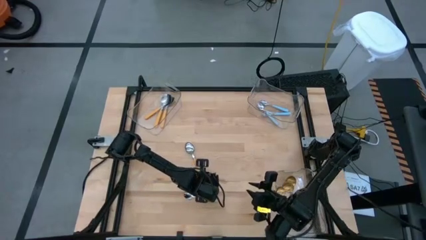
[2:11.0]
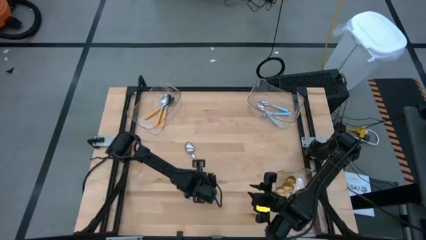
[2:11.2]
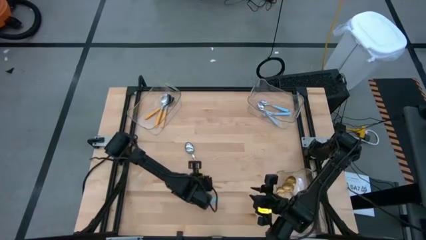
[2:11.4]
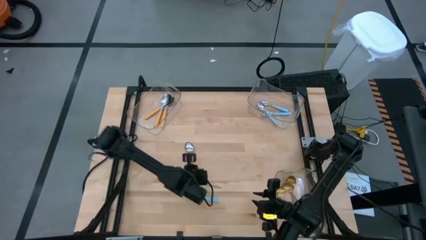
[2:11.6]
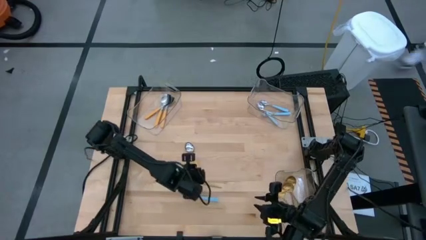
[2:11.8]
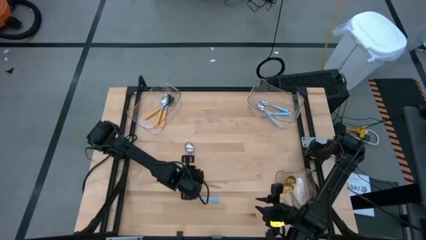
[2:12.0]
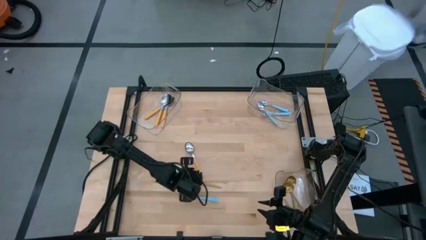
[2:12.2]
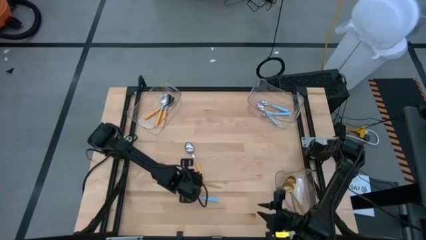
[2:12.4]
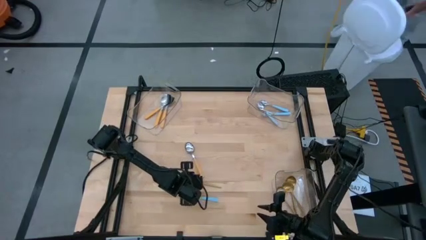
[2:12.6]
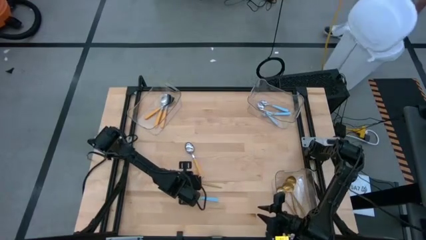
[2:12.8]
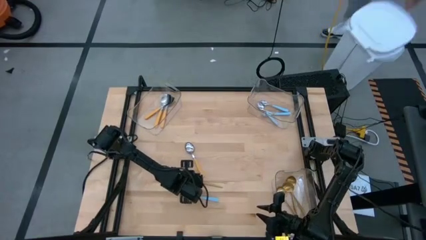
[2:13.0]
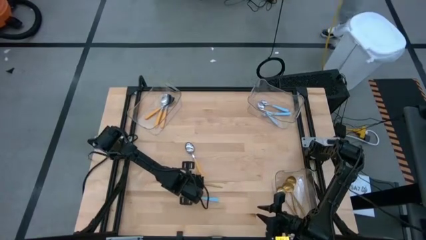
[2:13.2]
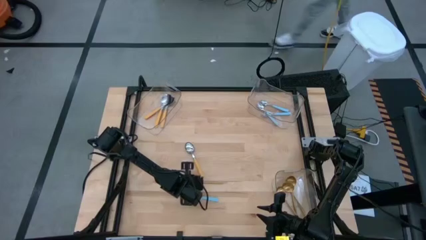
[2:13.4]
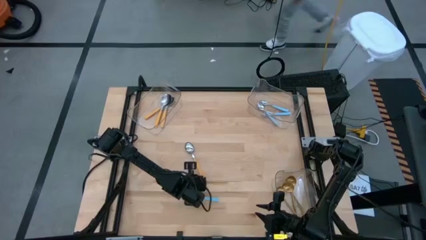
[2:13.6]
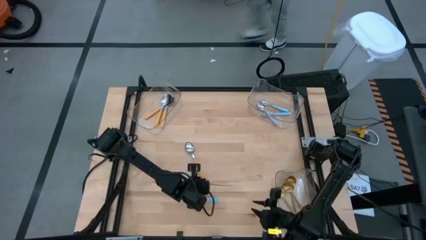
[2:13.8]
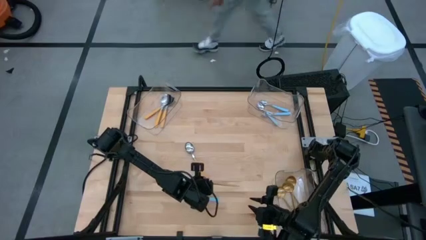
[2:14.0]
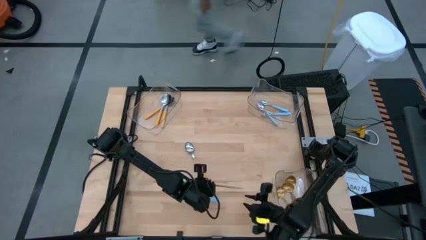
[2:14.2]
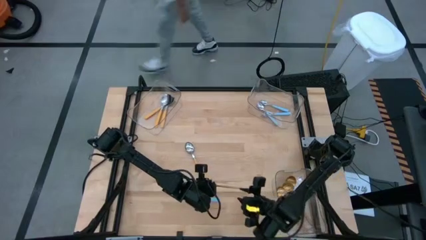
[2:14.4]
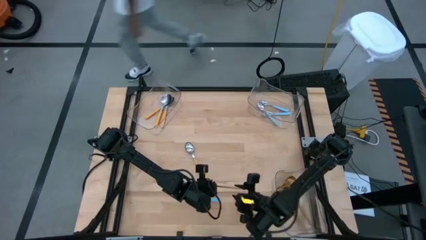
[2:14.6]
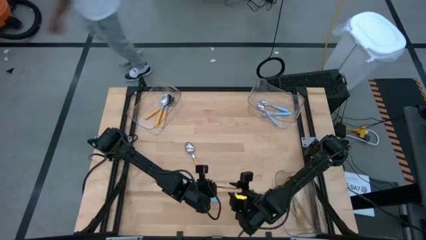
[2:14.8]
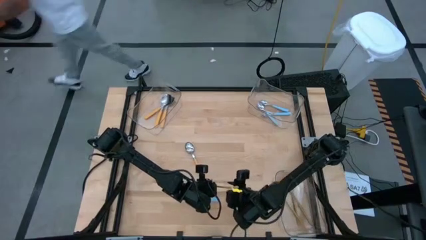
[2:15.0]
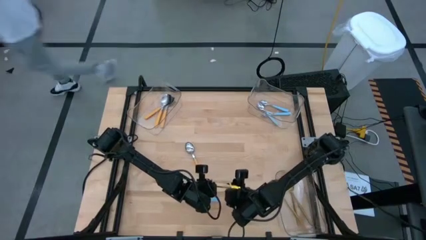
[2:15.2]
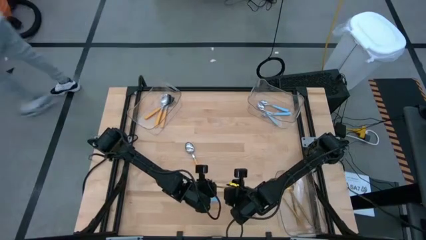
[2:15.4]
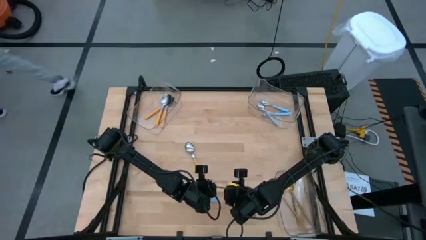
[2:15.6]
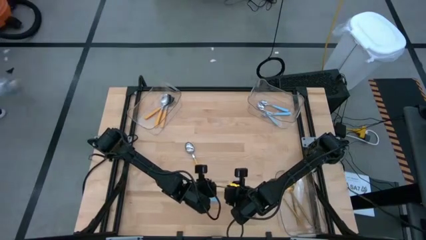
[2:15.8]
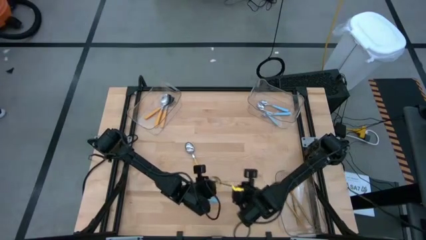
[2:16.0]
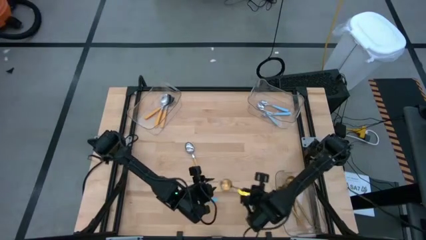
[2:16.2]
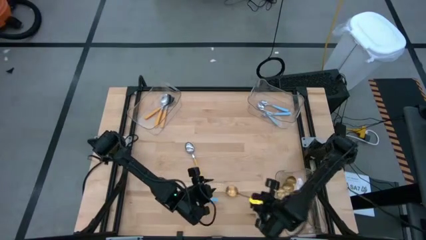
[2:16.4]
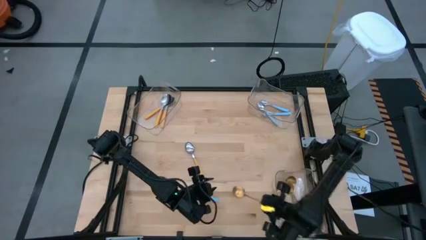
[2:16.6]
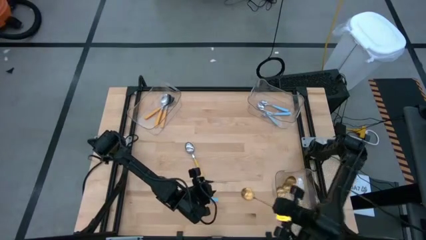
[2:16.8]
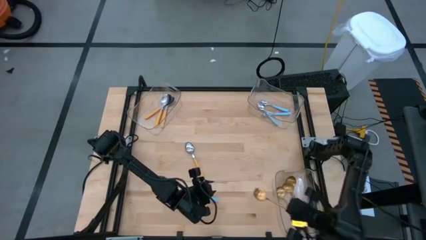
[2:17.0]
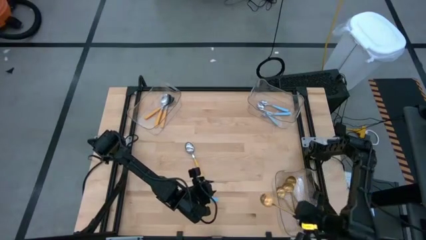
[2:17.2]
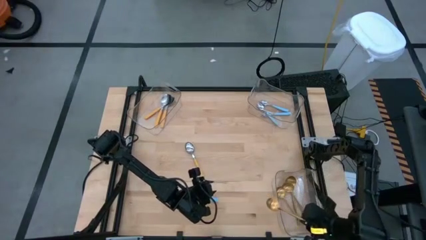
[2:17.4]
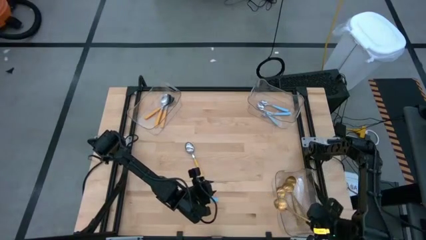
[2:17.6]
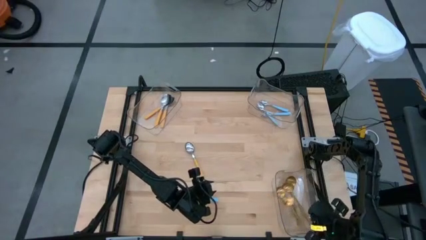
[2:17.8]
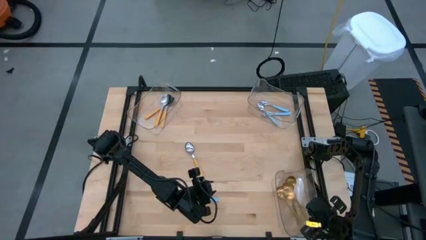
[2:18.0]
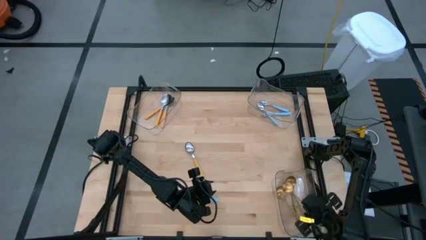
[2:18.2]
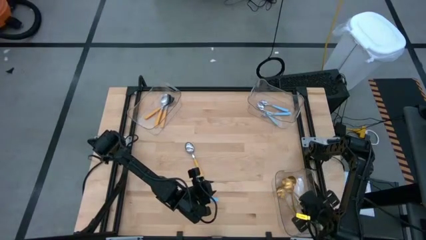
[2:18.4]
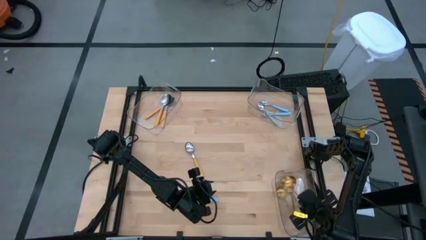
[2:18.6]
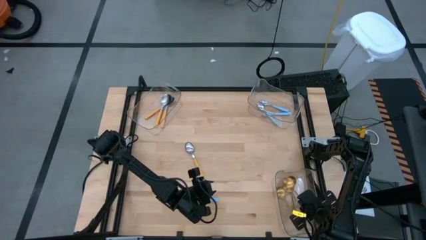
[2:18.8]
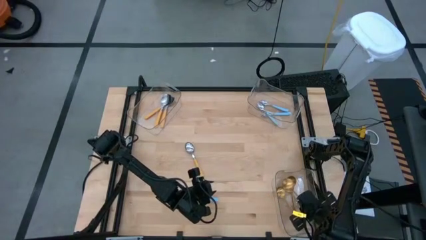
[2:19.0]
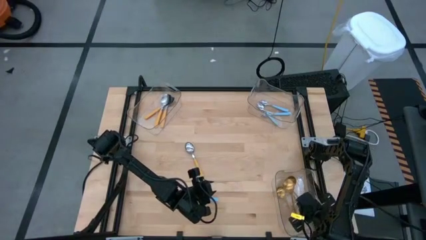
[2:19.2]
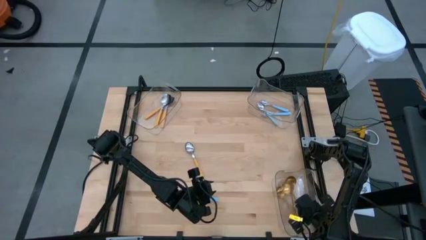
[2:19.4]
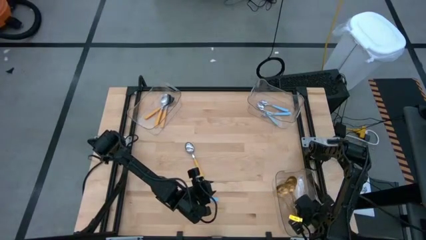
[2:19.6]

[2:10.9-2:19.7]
Task: Sort silverware by color (type)
Put the gold spoon into the bottom transparent bin

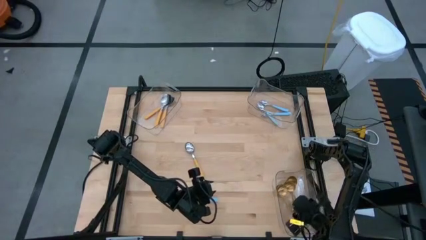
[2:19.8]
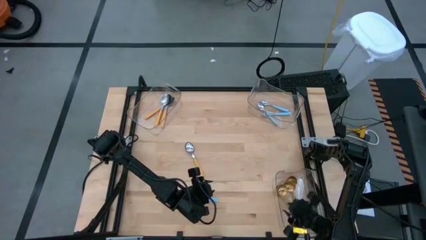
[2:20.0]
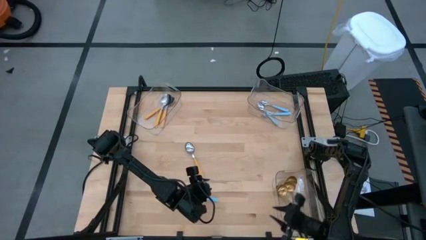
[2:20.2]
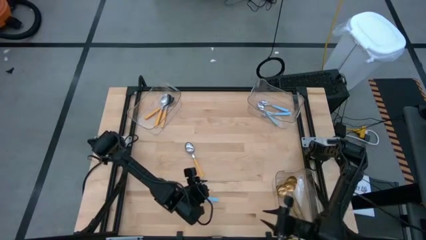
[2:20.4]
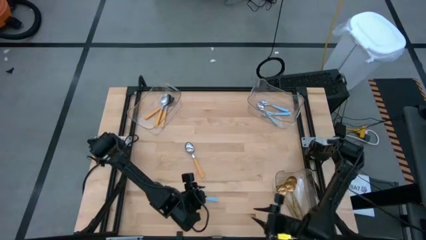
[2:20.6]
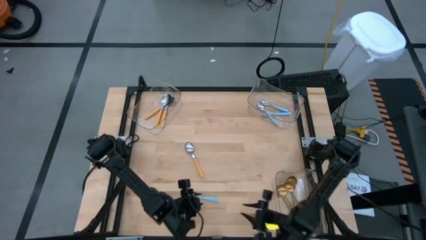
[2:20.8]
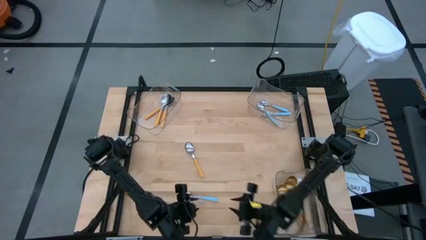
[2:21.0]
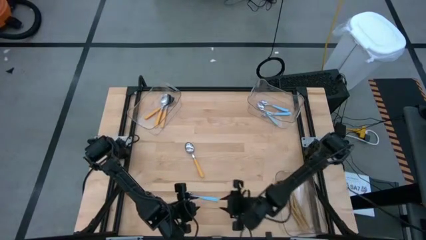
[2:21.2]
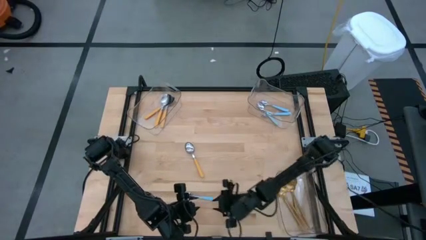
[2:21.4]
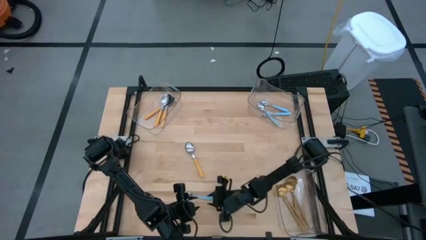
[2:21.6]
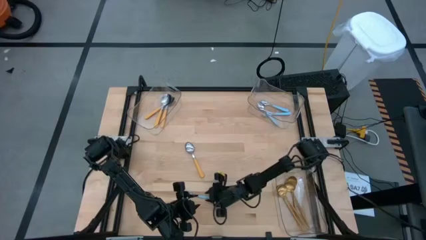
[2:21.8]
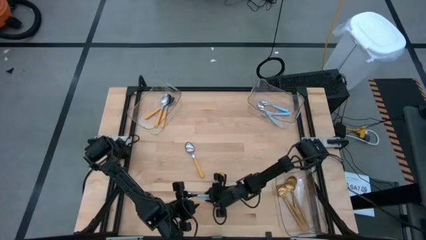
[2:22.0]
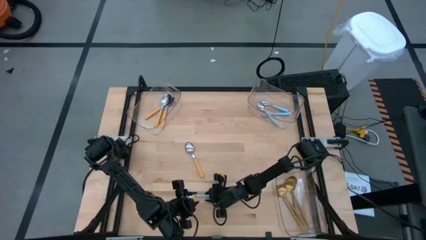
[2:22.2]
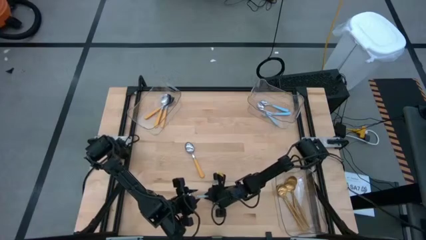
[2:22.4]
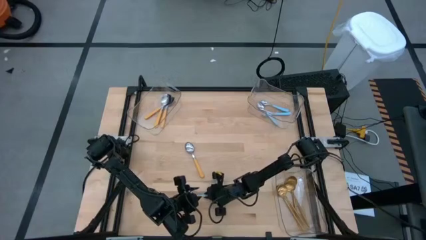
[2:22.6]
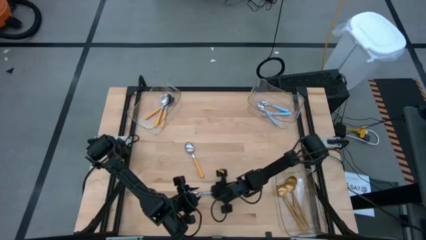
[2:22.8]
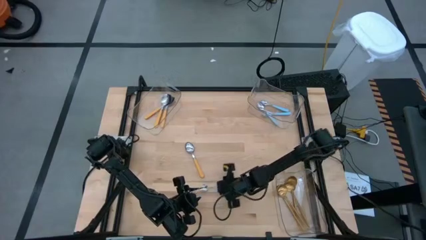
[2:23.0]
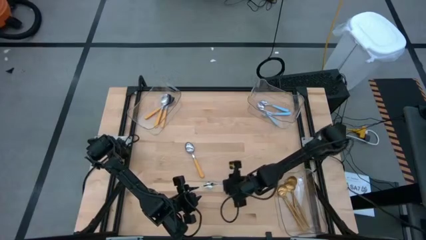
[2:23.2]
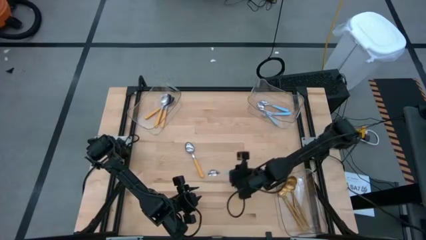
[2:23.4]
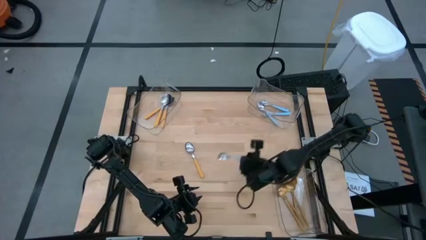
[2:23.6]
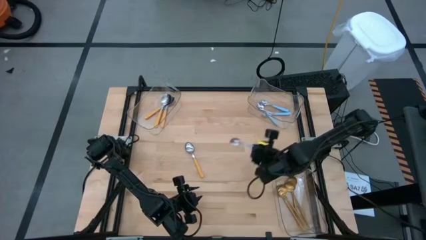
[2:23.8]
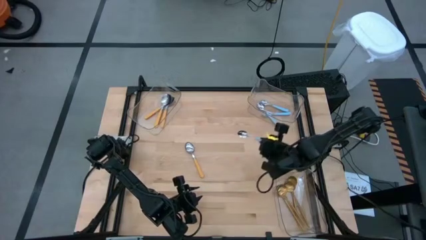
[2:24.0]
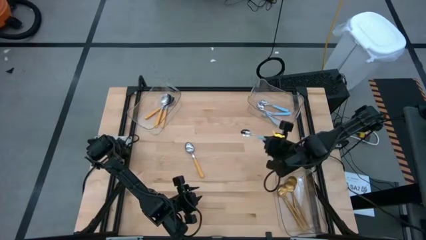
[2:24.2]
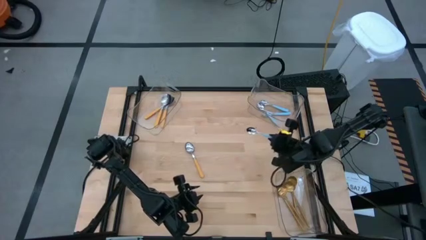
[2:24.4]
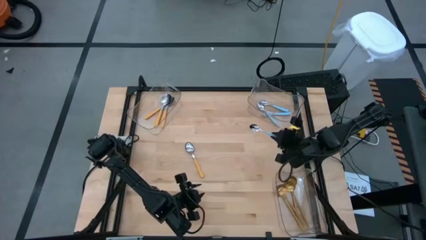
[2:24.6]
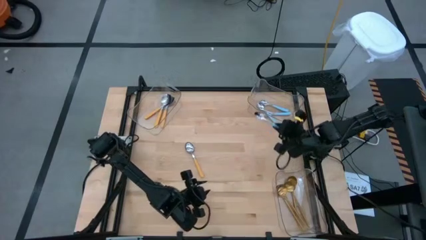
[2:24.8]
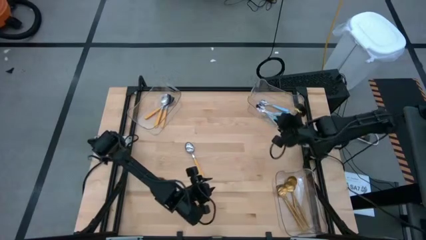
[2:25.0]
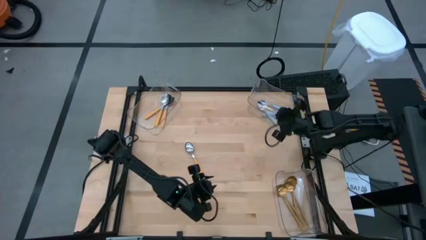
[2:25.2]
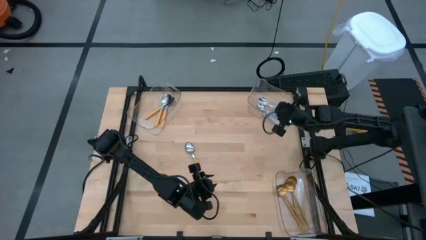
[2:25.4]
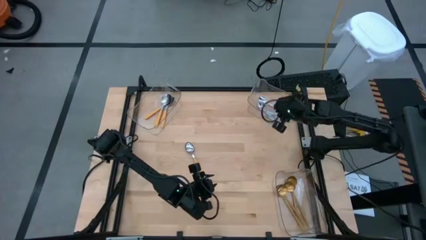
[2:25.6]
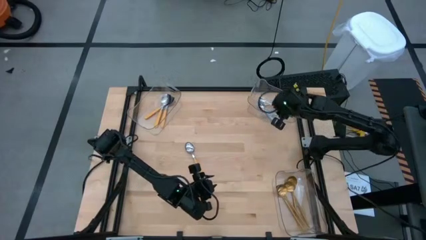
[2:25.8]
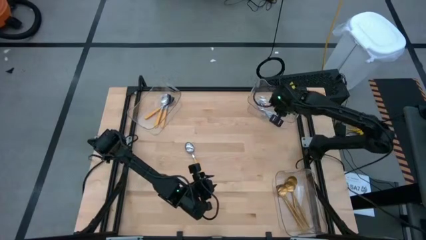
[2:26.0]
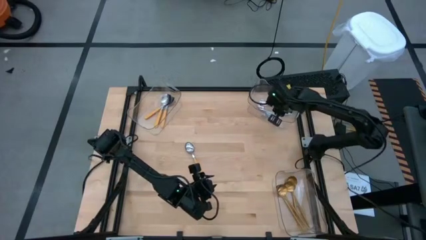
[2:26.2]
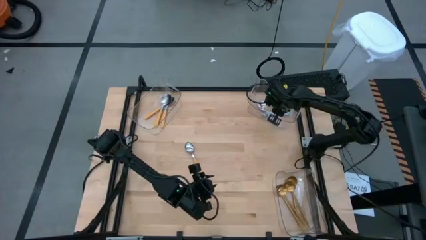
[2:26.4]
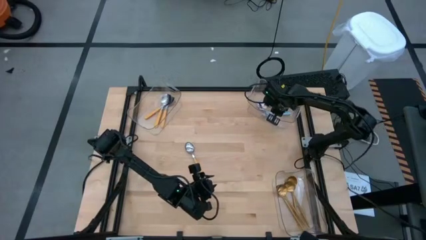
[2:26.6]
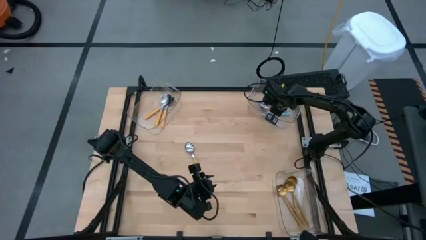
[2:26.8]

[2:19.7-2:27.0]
Put the blue spoon into the top right transparent bin

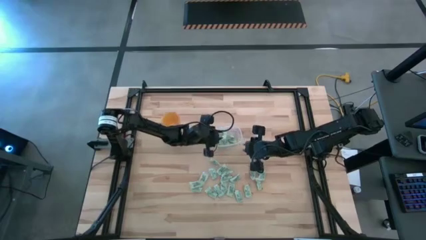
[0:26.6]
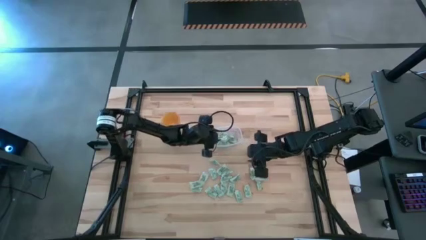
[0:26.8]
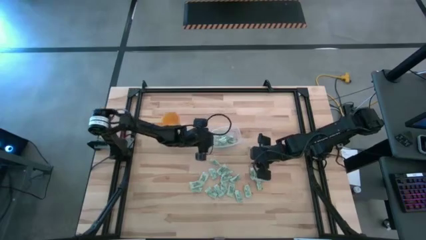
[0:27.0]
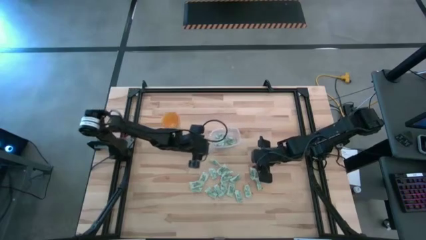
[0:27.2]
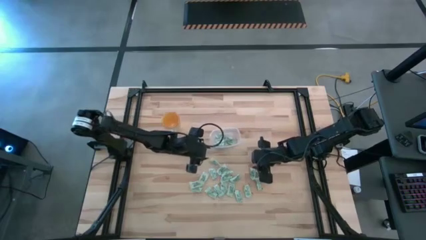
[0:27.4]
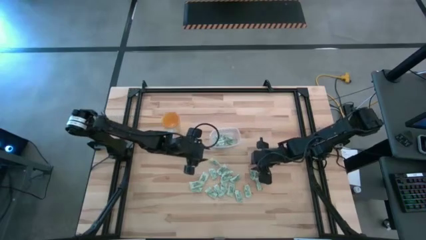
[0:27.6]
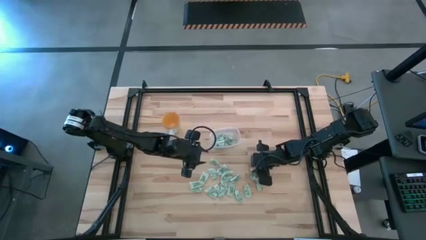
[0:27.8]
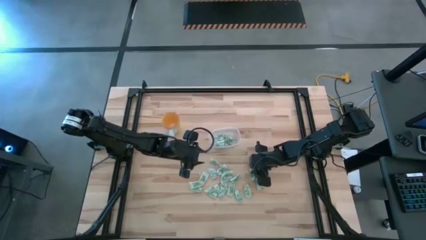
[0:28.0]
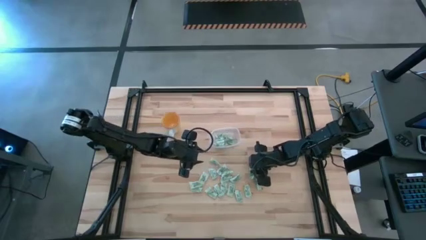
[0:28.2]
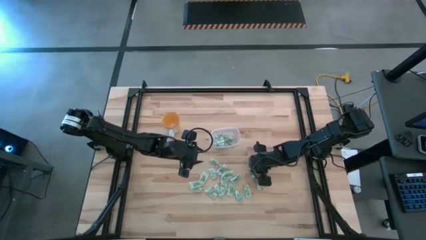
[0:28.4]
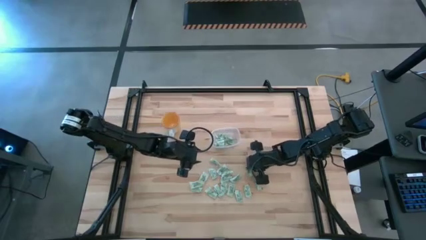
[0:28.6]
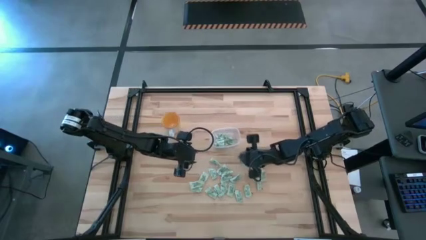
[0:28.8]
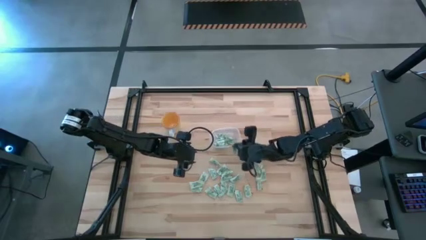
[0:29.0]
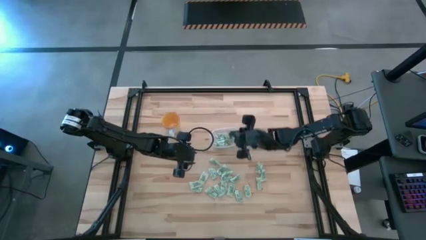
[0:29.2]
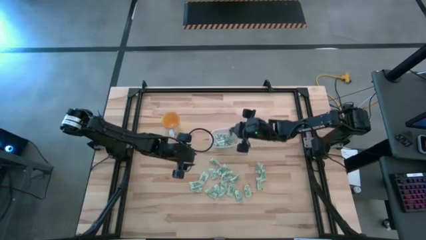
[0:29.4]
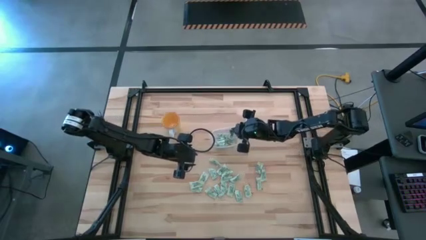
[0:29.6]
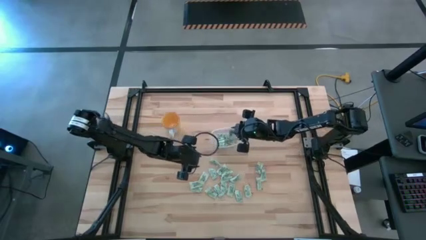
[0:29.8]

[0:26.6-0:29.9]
Task: Pick and place Stevia / Truvia into bins
Put the stevia packet into the transparent bin
